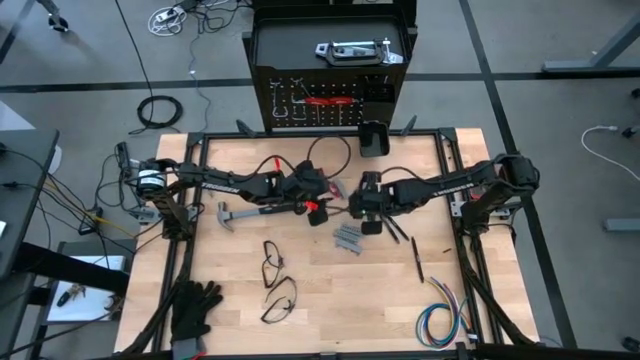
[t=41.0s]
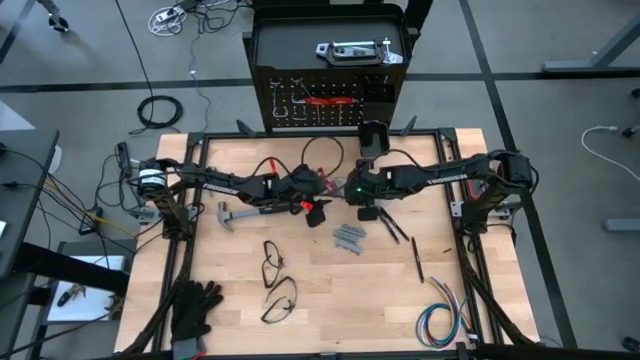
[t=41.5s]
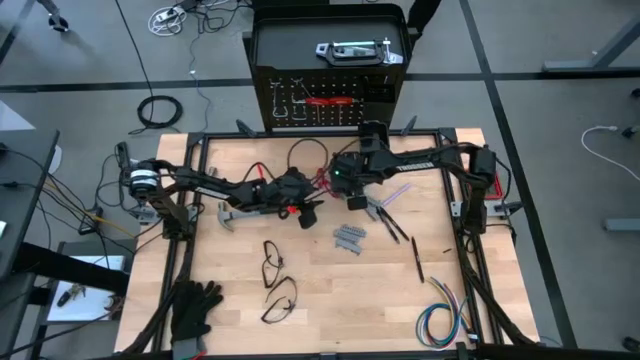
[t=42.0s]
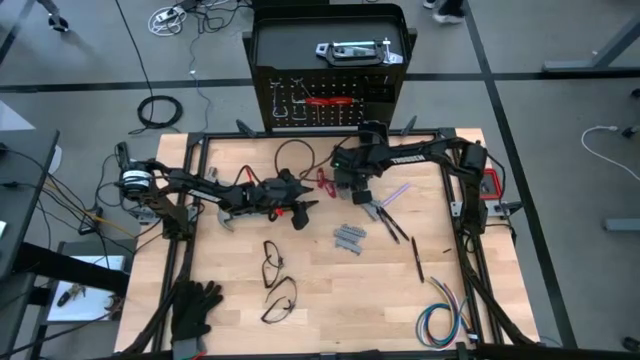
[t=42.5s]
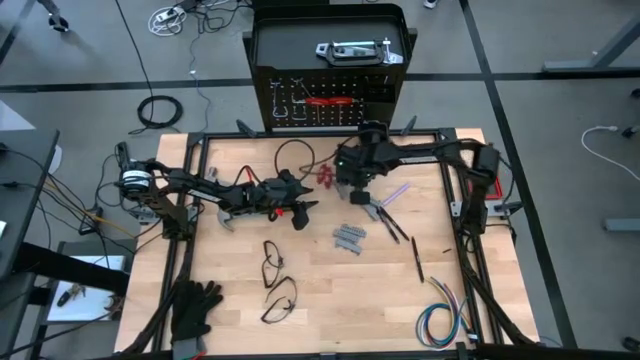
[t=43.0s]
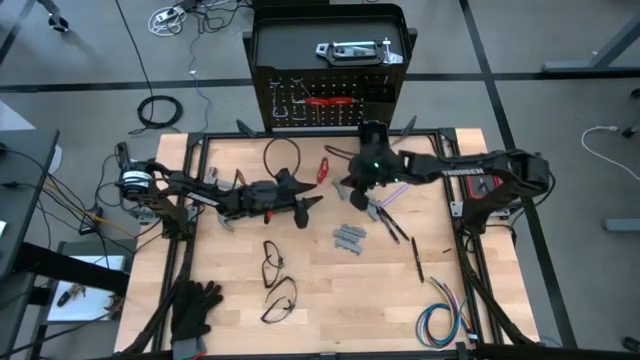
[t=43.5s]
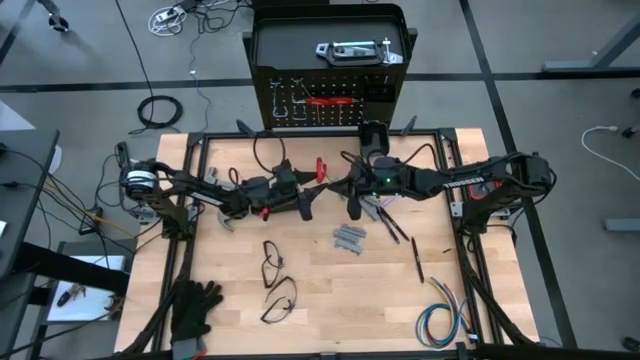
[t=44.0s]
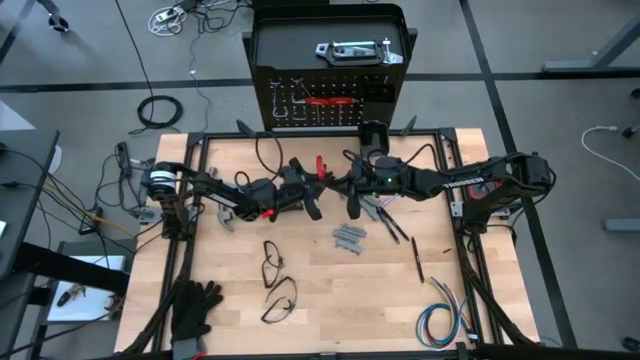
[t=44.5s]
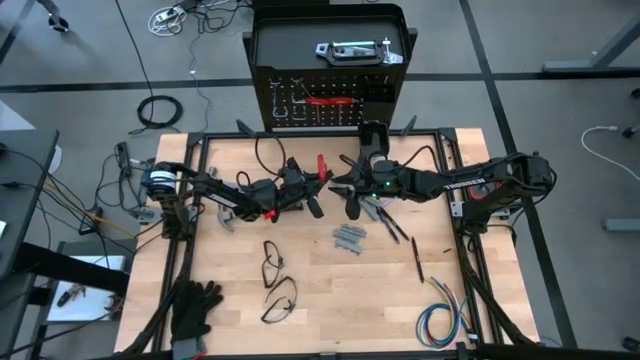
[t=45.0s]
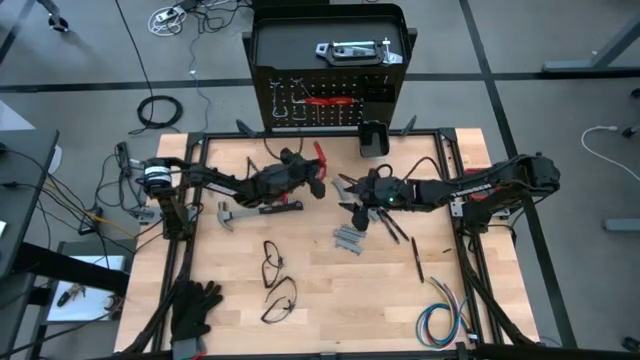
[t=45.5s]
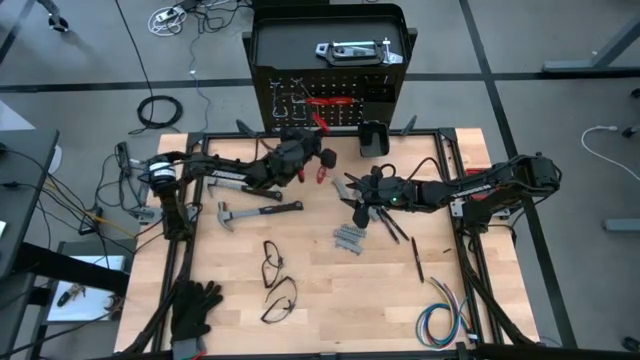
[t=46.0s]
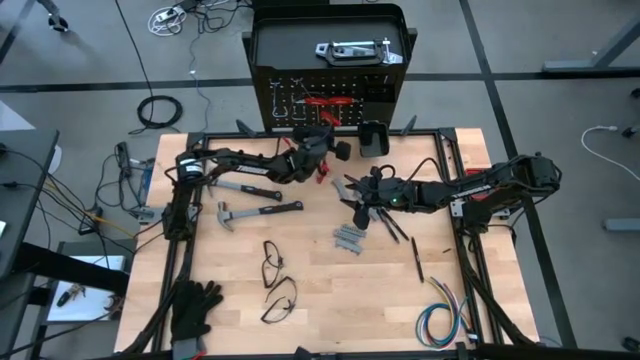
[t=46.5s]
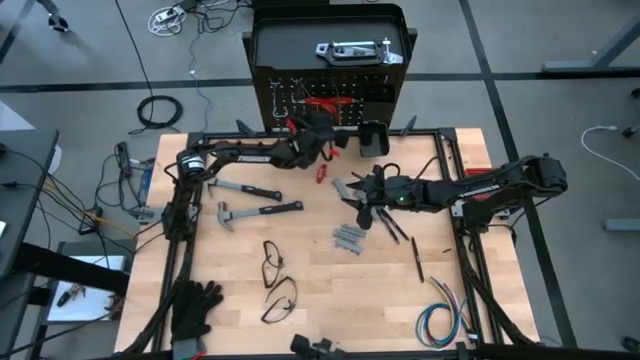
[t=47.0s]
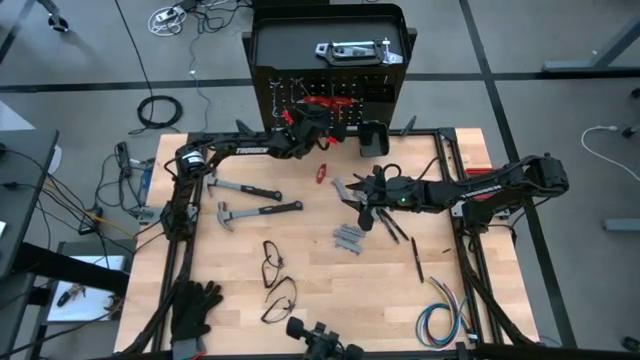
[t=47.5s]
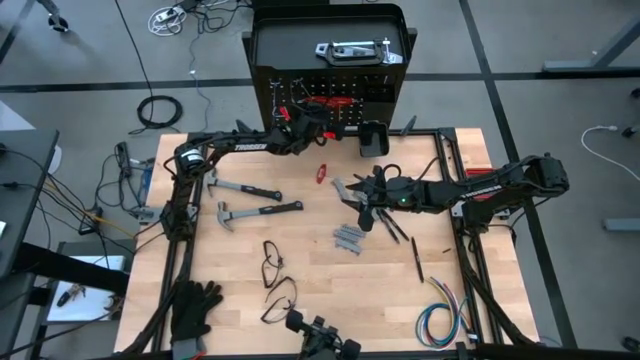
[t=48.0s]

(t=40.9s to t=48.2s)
Task: Hang tools onto peg board
Hang the bottom T-shaped metric hex key on the pegboard

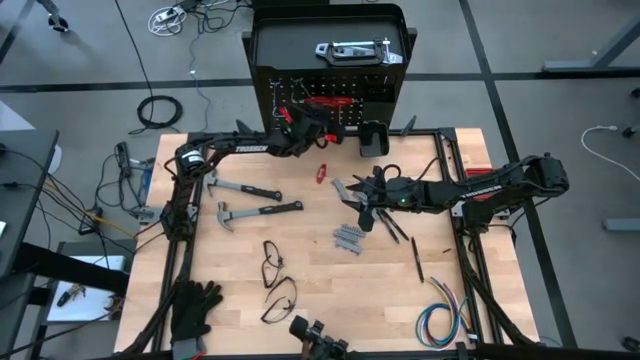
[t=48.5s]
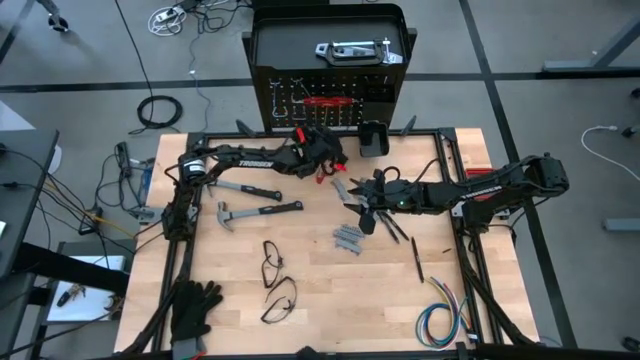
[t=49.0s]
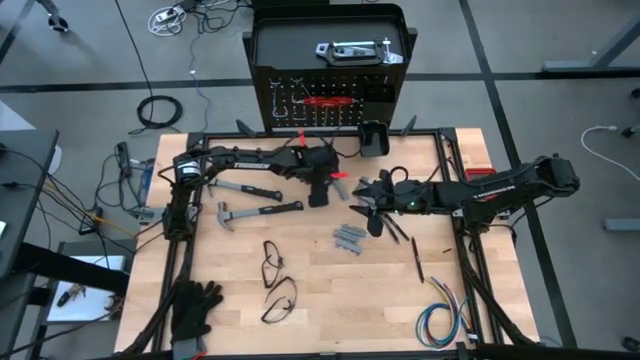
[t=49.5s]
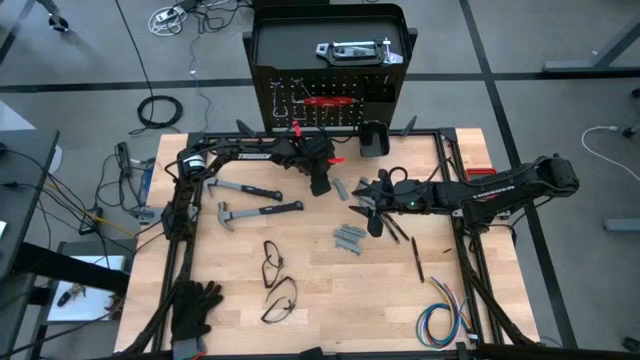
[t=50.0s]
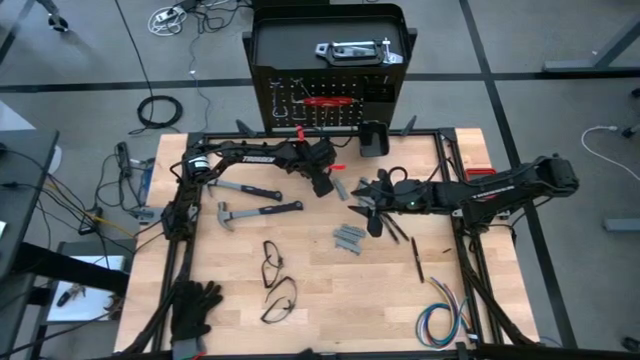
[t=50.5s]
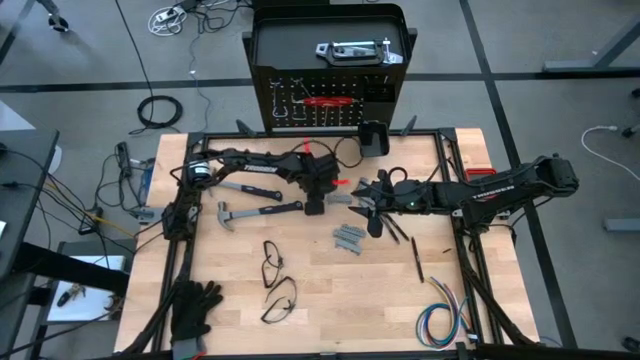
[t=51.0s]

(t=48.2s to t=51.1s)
Hang the T-shaped metric hex key on the pegboard

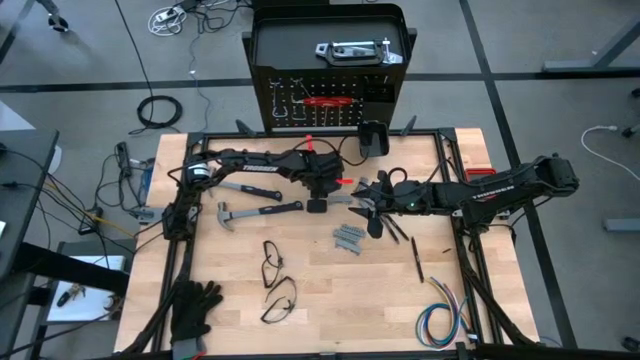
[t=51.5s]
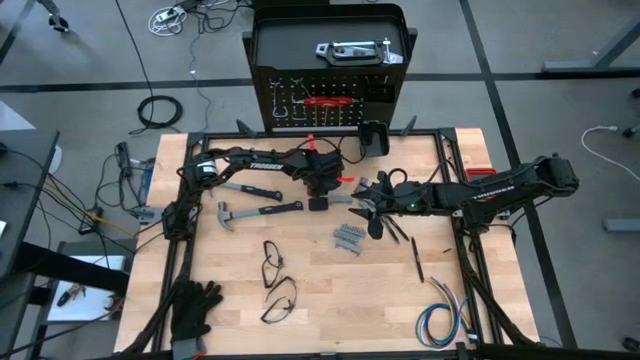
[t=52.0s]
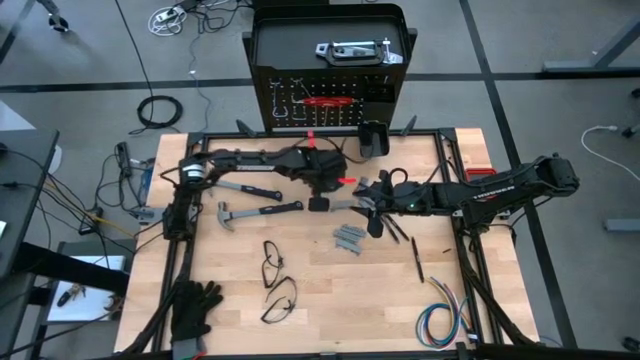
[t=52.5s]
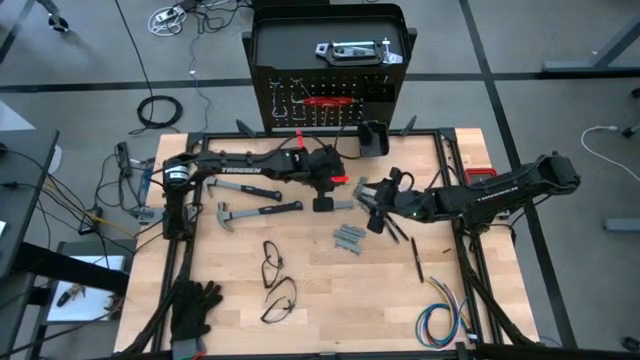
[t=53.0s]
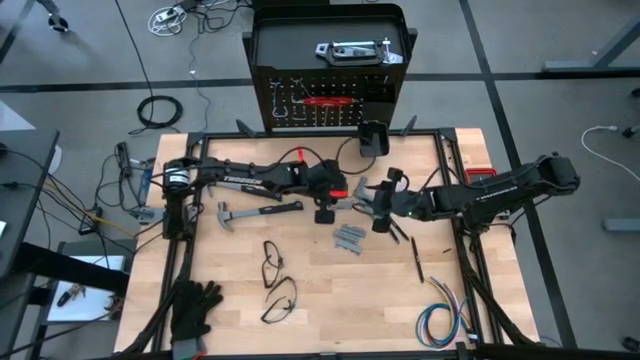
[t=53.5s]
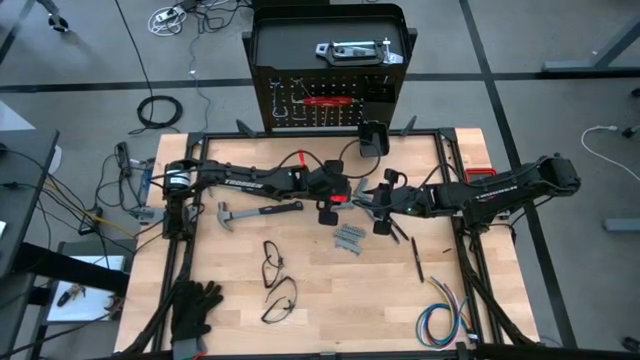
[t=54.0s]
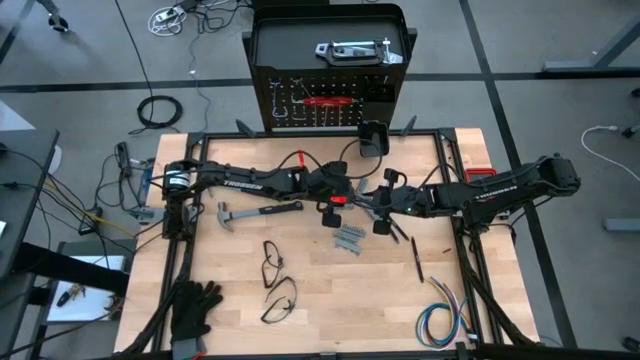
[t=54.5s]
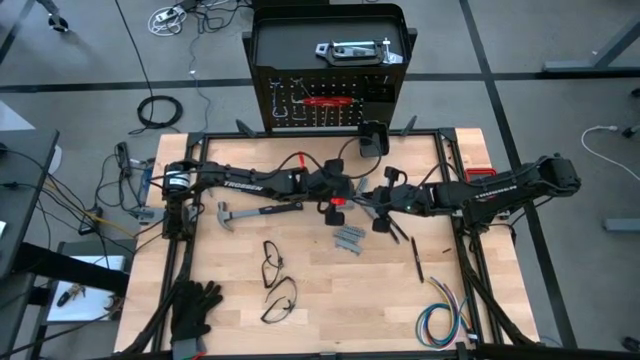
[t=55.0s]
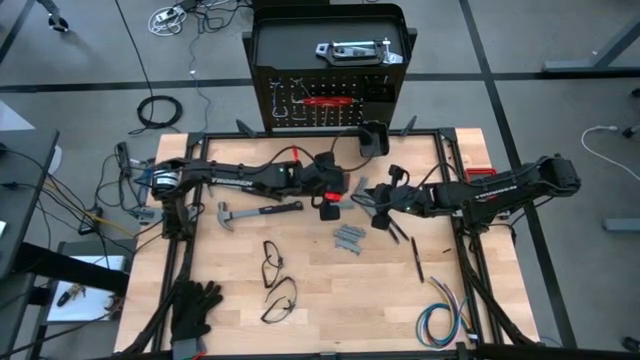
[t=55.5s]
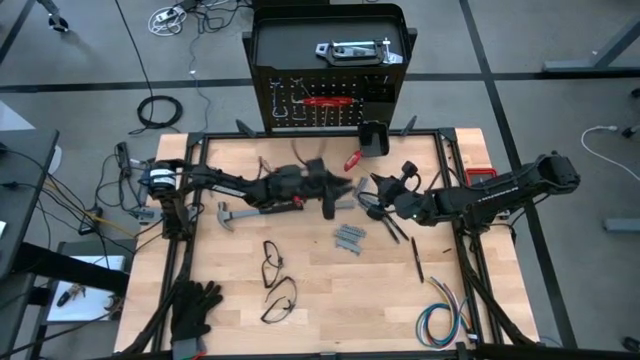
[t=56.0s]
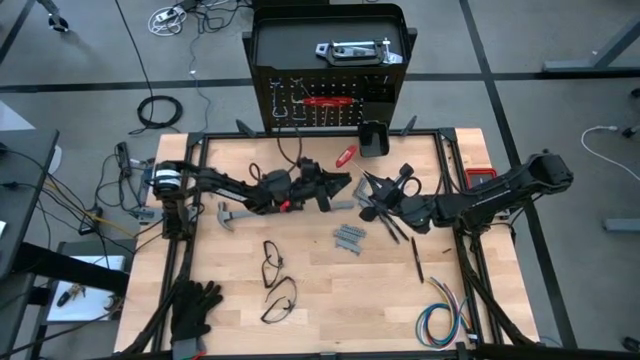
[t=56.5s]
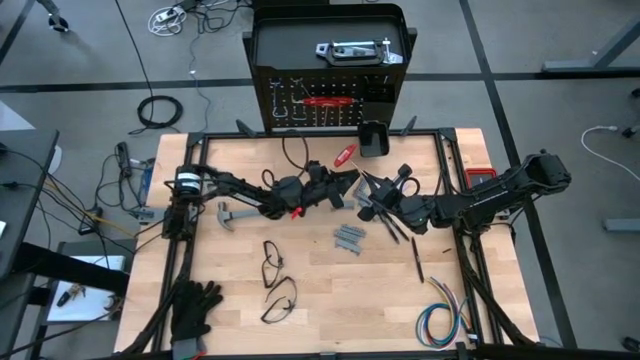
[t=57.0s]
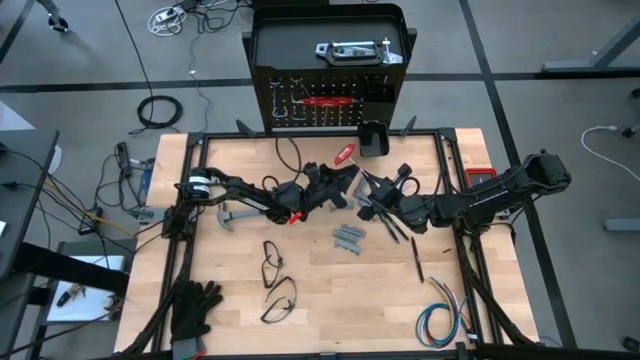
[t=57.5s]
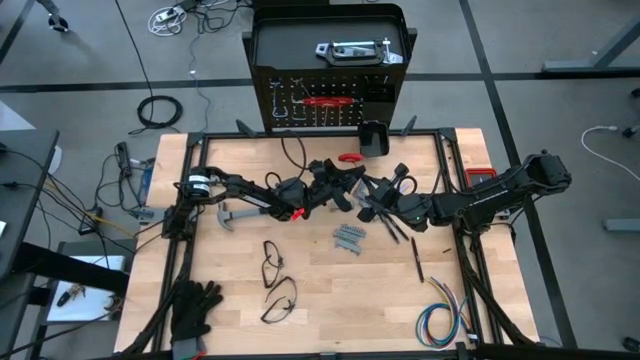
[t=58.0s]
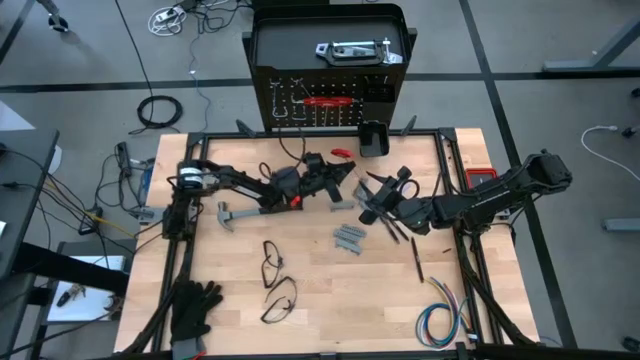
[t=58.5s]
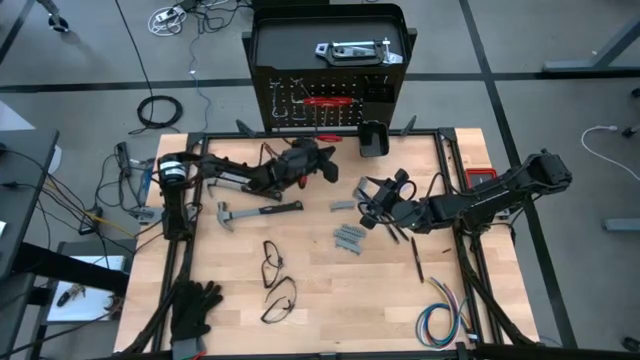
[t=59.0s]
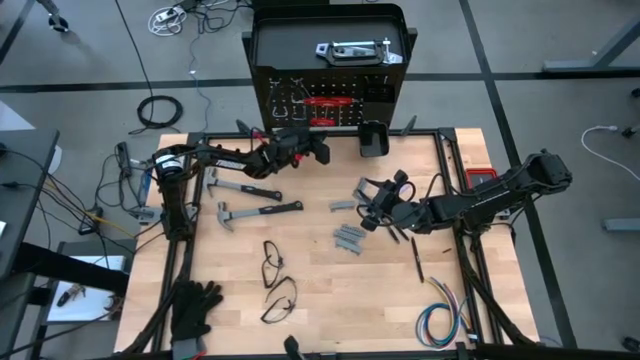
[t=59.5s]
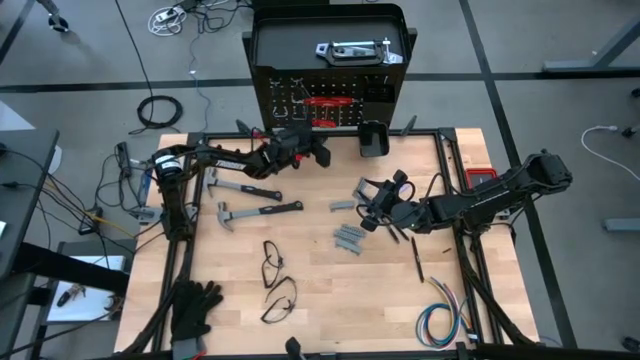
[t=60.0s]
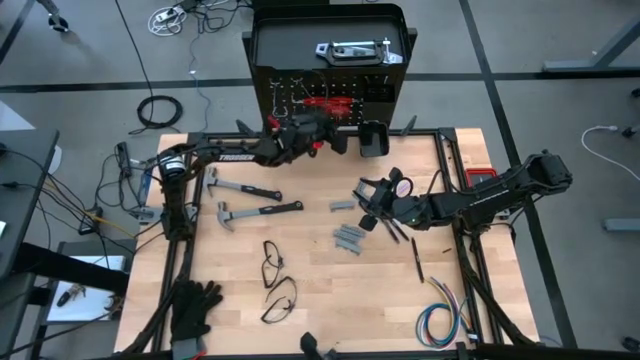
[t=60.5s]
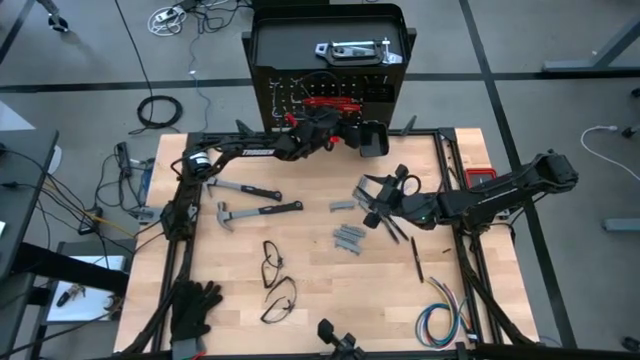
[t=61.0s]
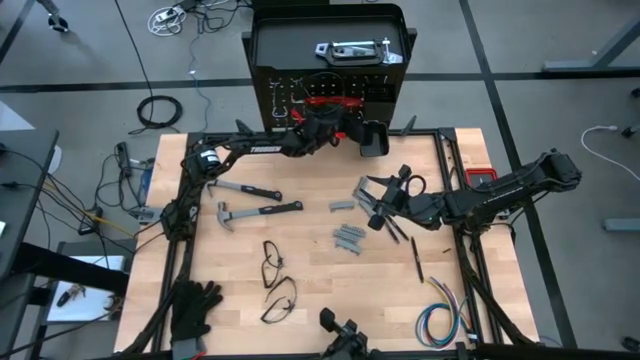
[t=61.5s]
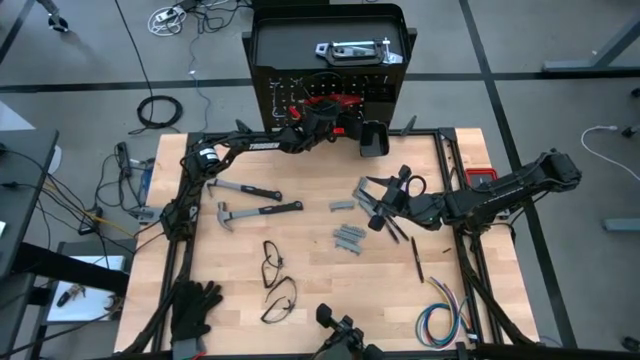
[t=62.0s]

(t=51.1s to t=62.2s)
Hang the T-shaped metric hex key on the pegboard

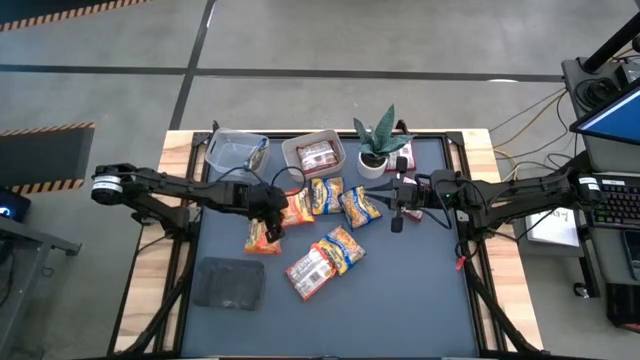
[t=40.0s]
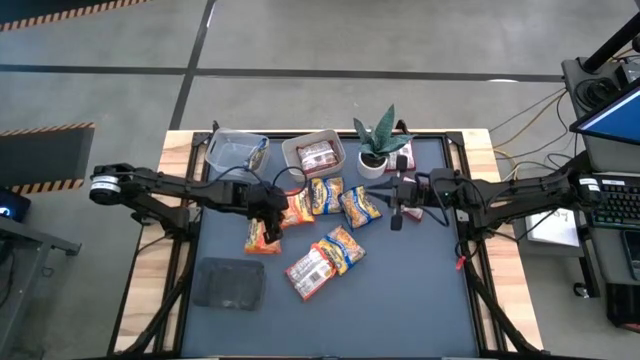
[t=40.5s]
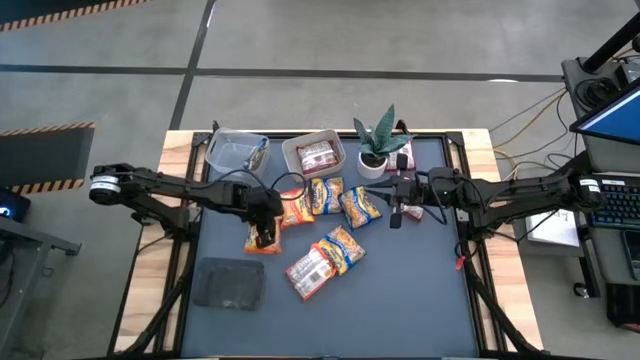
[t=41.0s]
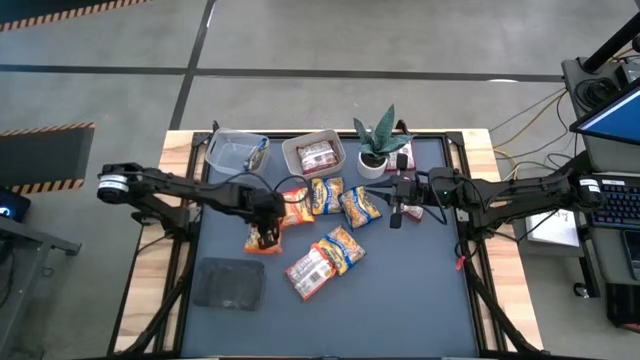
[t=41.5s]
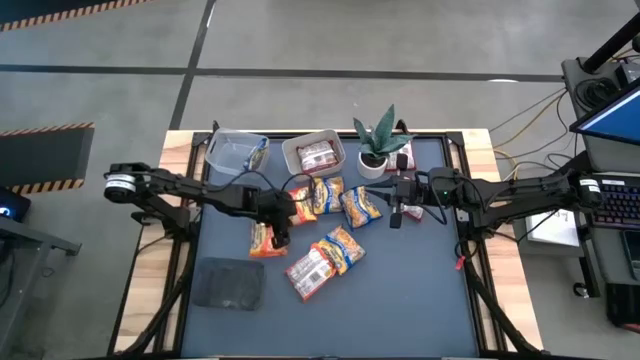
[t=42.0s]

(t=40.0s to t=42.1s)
Task: Sort Maruchan noodles
Adjust the orange noodle pack
